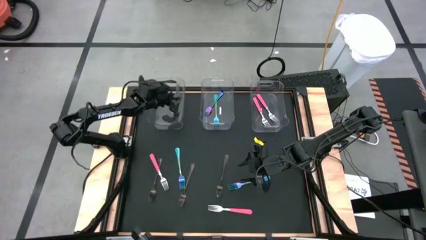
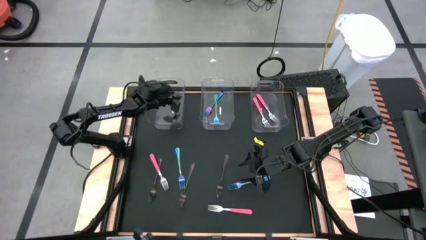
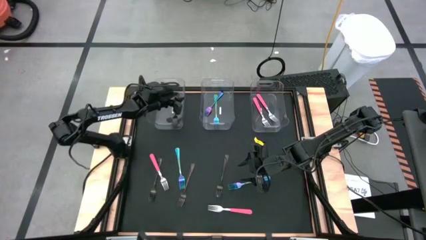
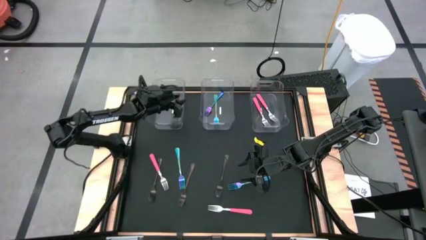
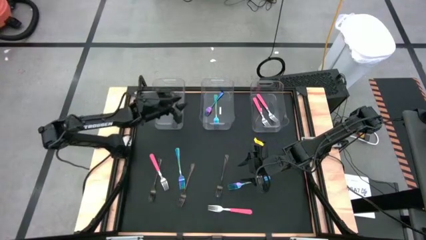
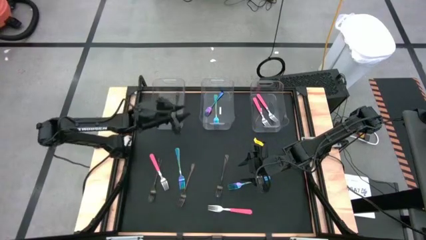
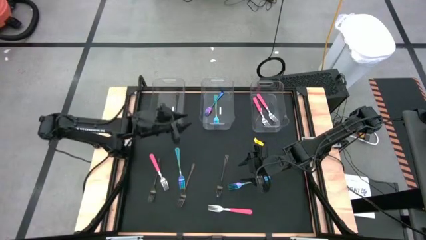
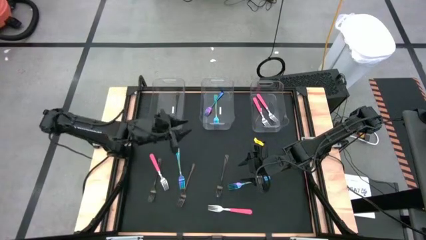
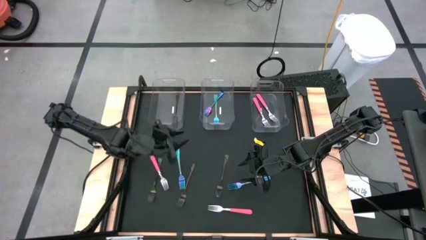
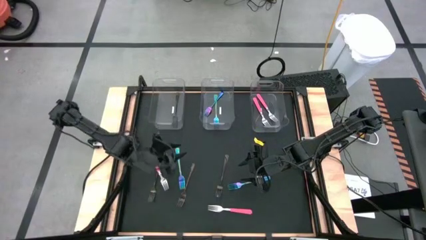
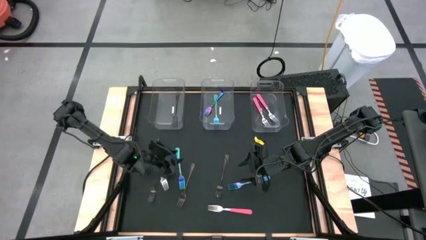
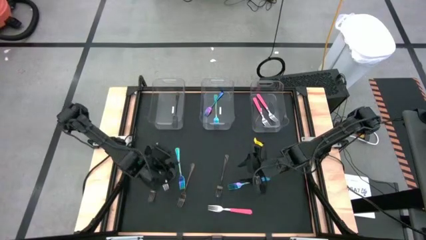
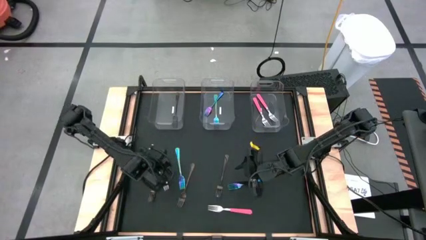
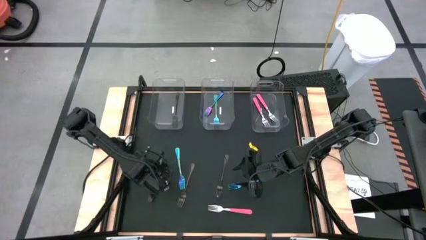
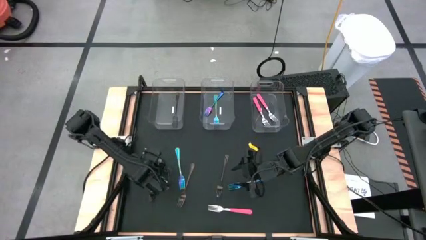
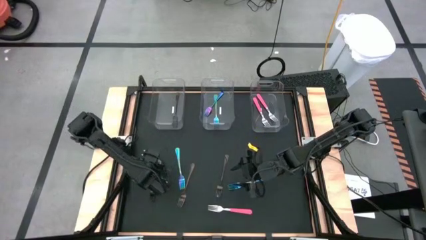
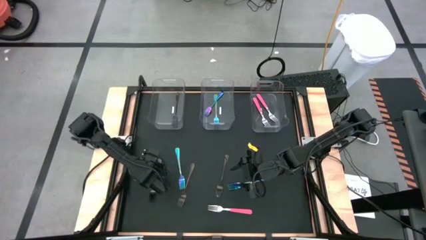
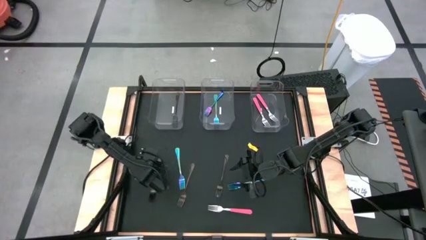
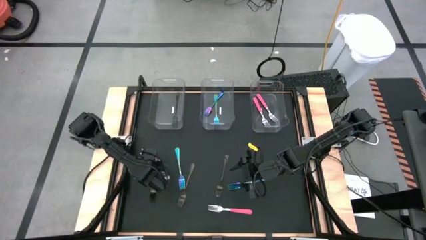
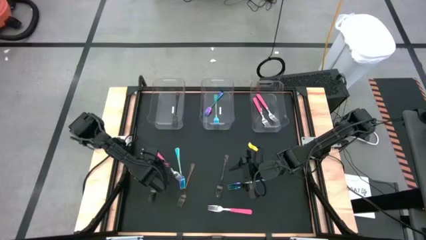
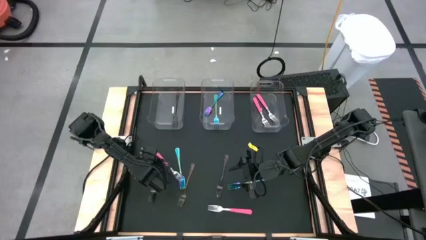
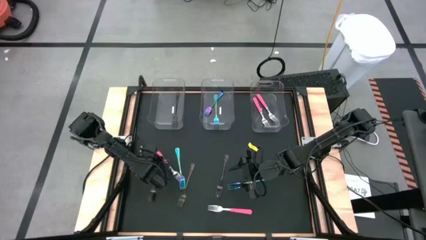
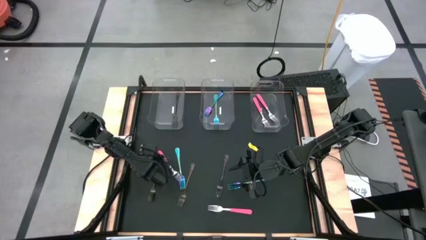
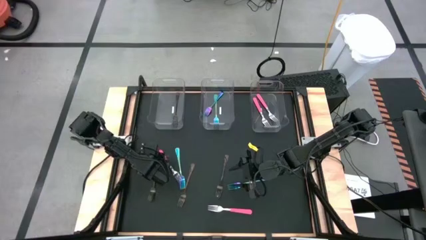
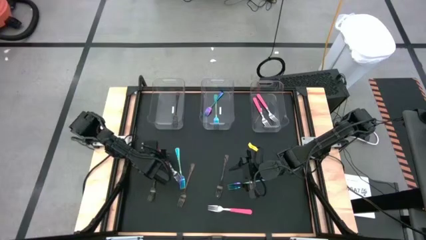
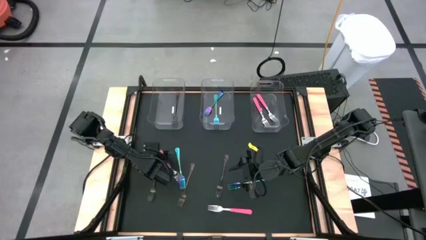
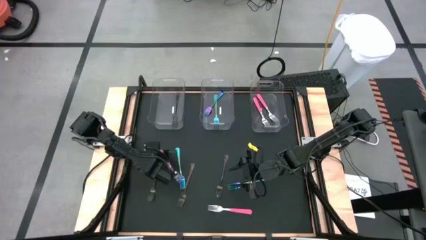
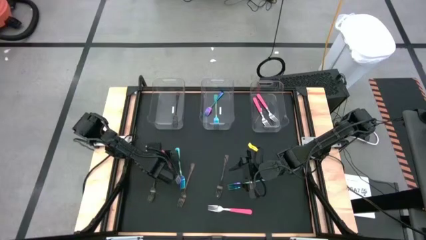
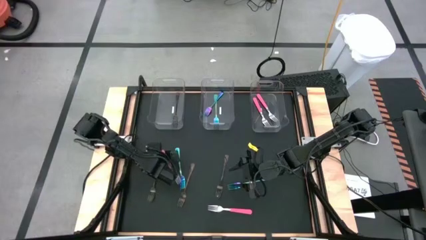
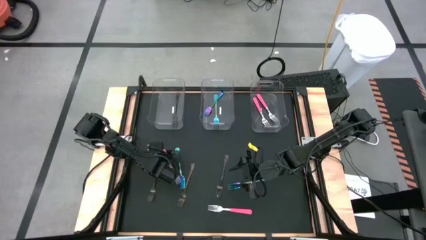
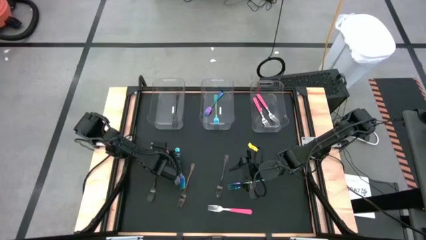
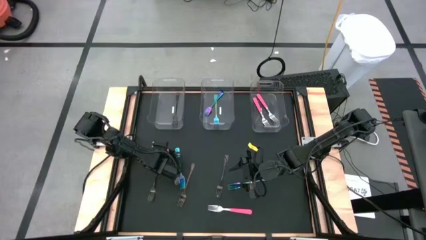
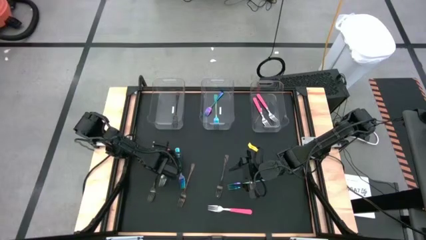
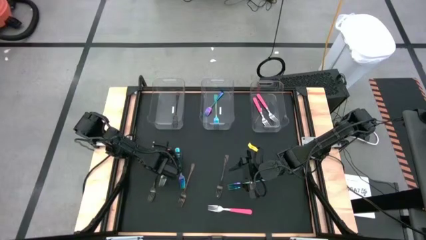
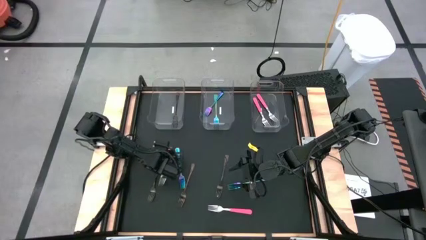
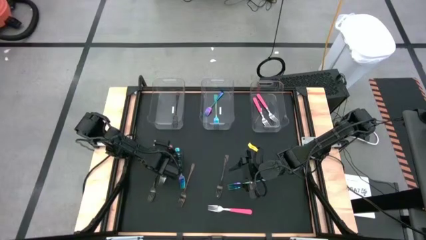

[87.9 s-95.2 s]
Task: Sort silverware by color (type)
Put the pink fork into the right transparent bin

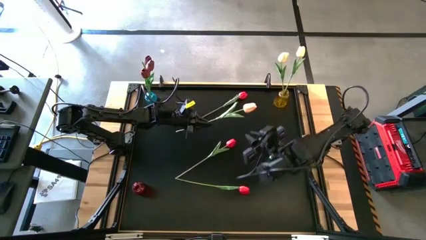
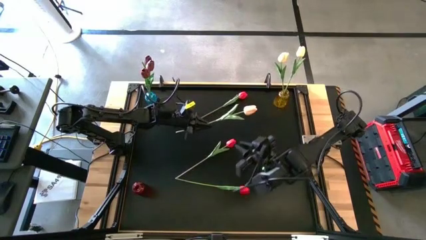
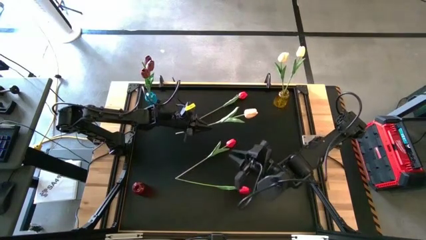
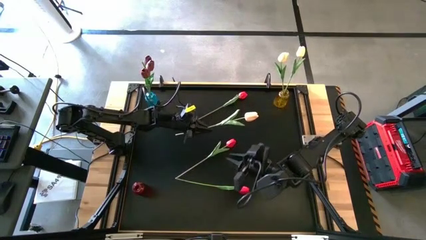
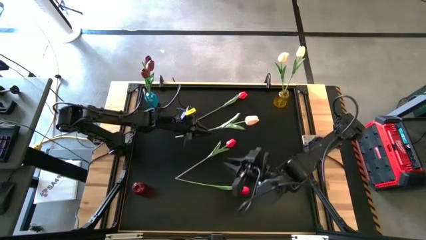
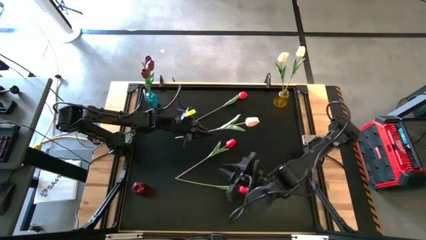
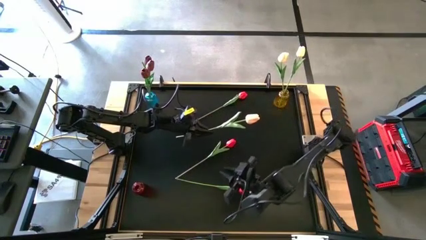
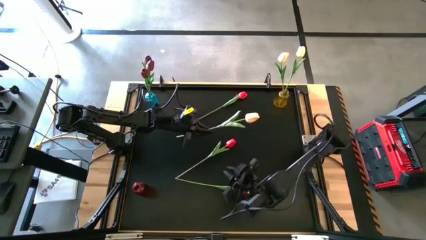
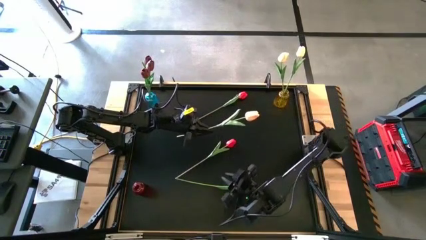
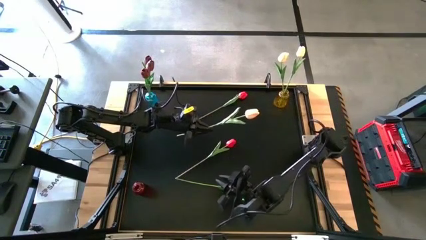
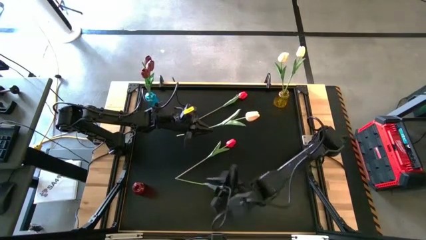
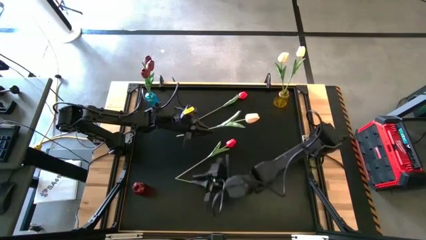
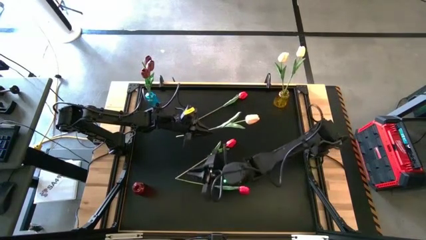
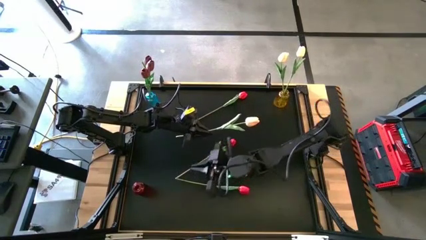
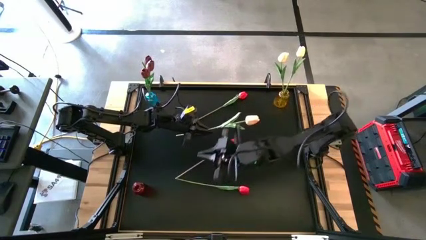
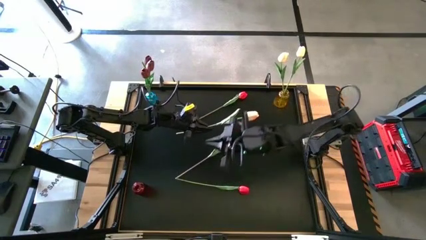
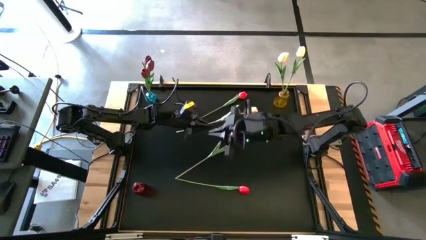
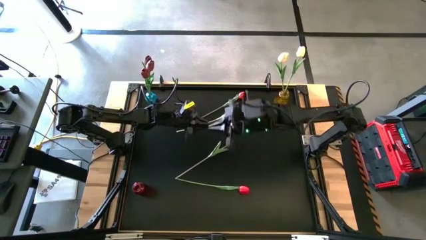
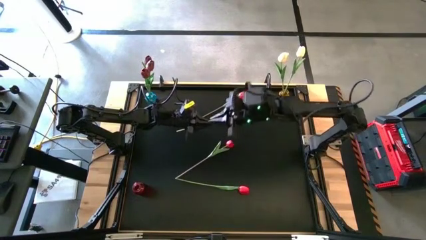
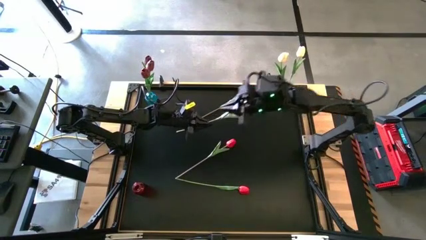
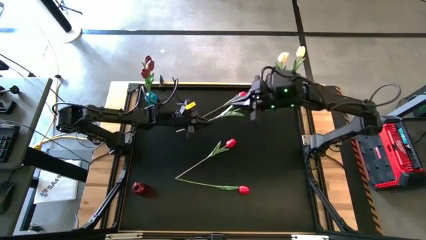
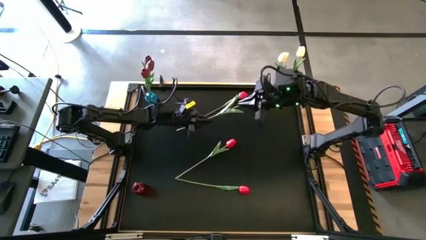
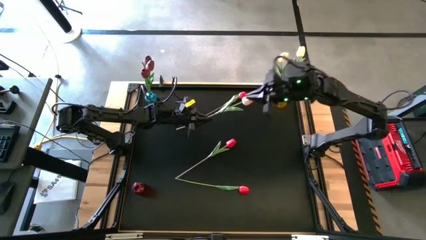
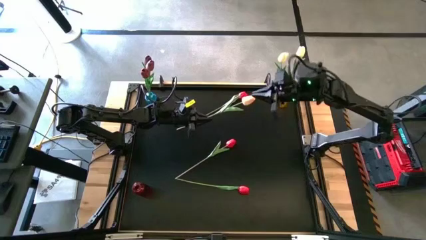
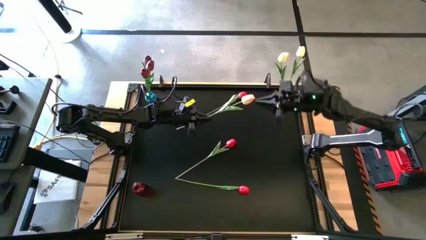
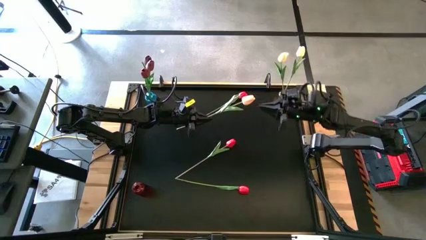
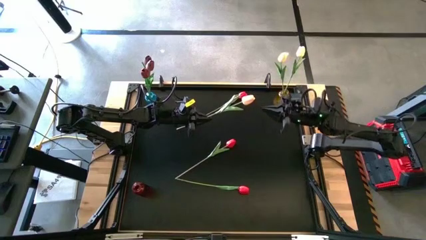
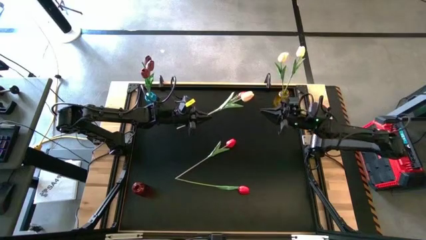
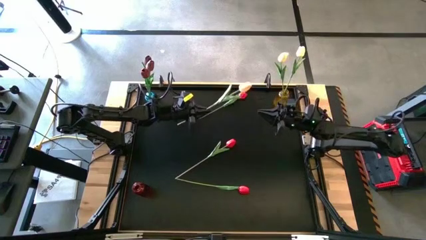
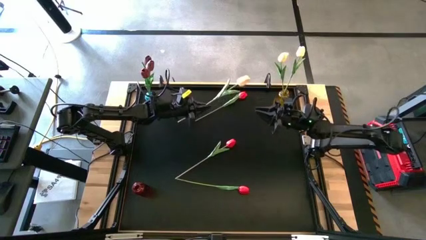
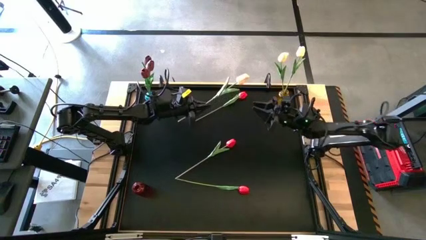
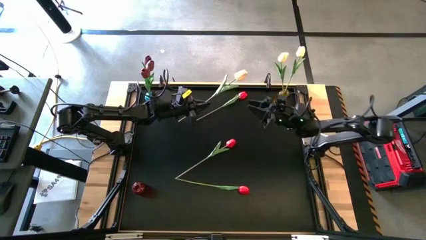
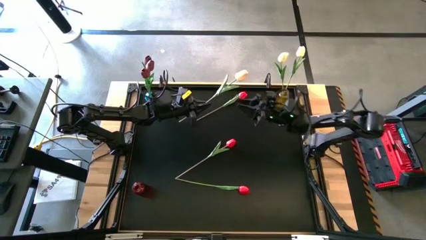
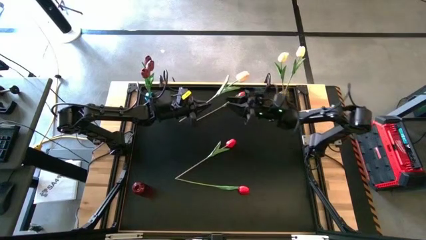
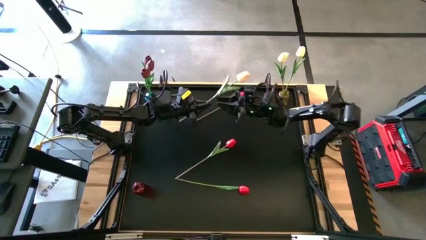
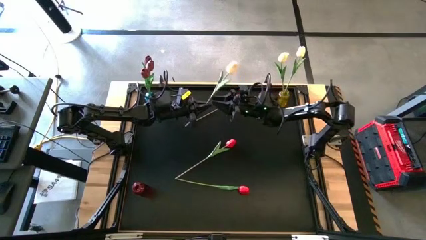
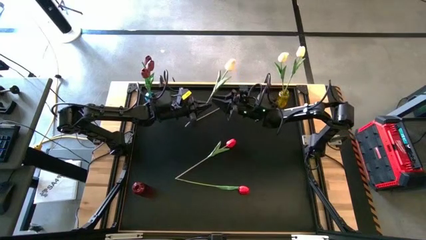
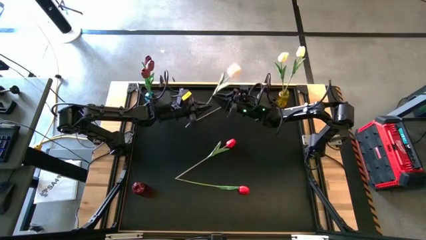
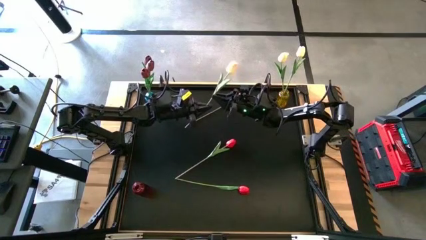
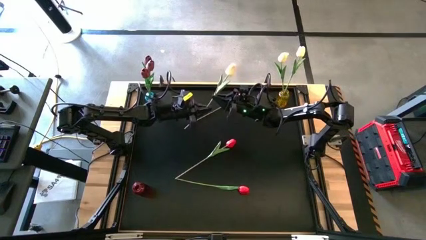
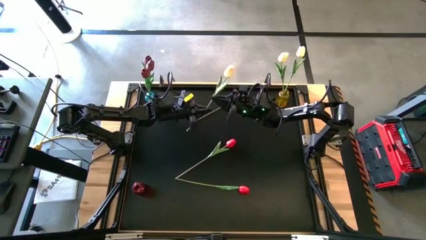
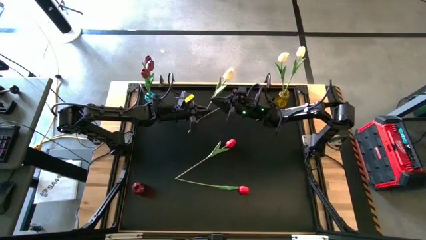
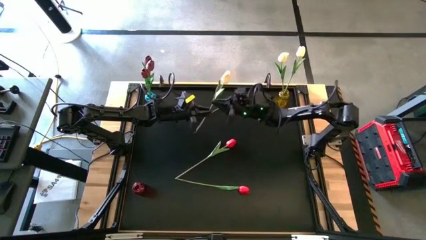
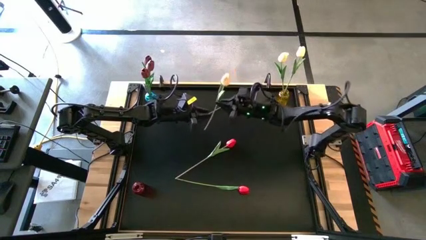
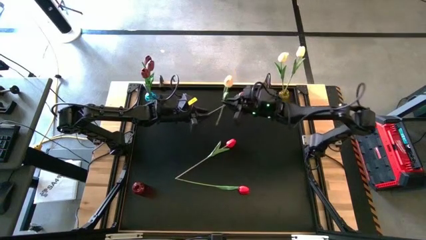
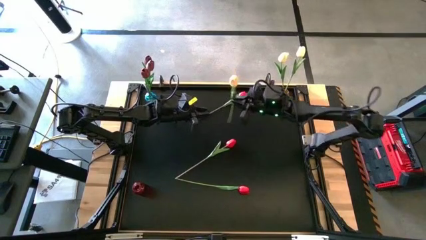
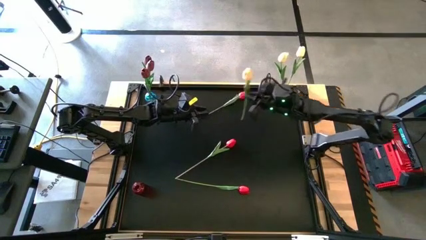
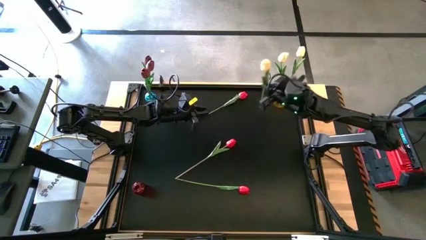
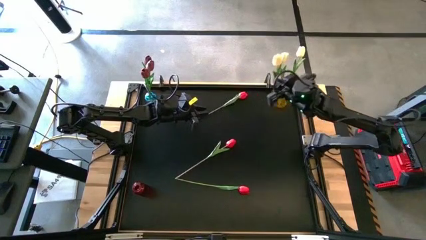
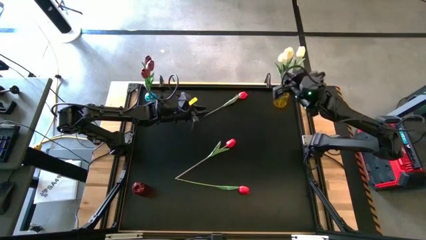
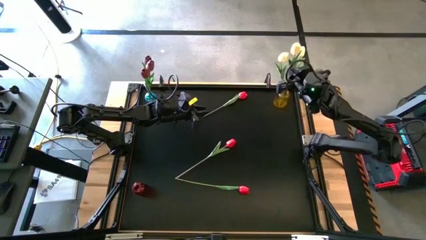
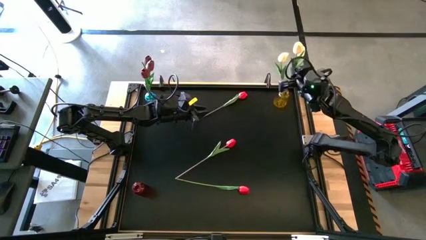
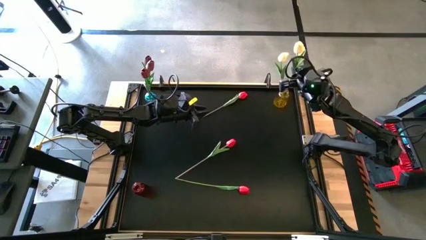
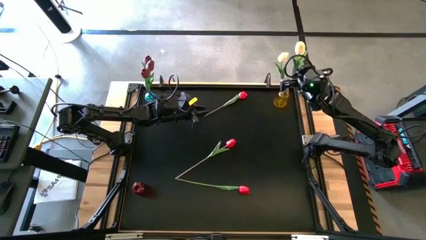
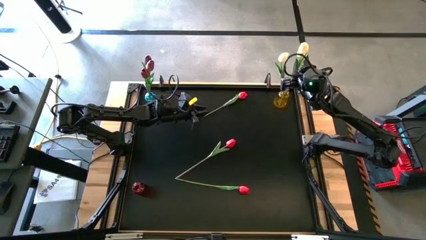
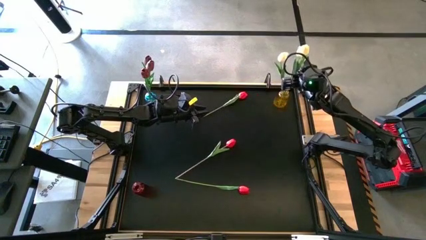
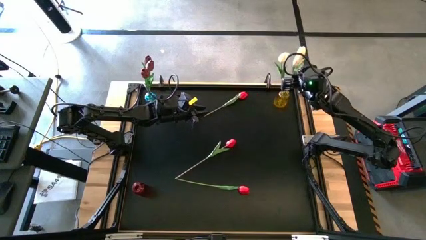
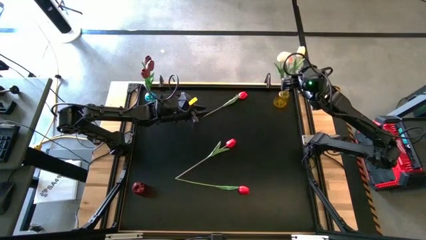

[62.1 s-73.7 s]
Task: Sort flowers into vase by color
Put the yellow flower into the yellow crystal vase
